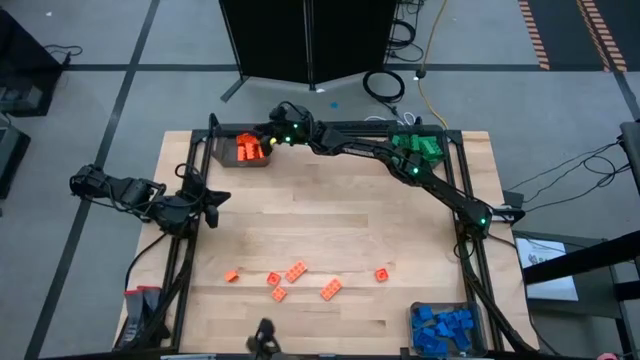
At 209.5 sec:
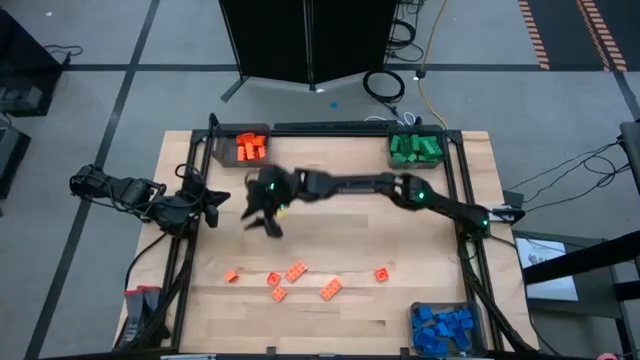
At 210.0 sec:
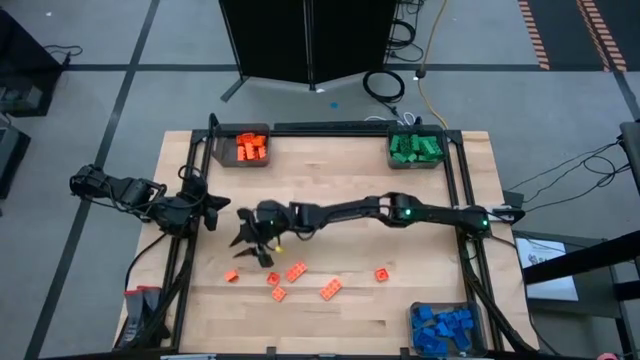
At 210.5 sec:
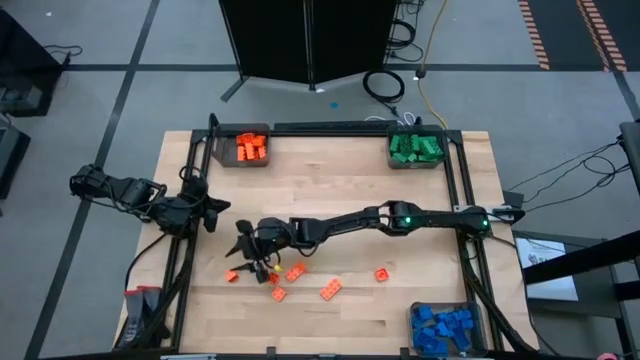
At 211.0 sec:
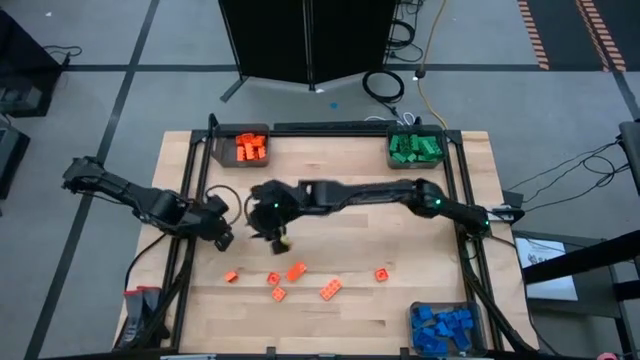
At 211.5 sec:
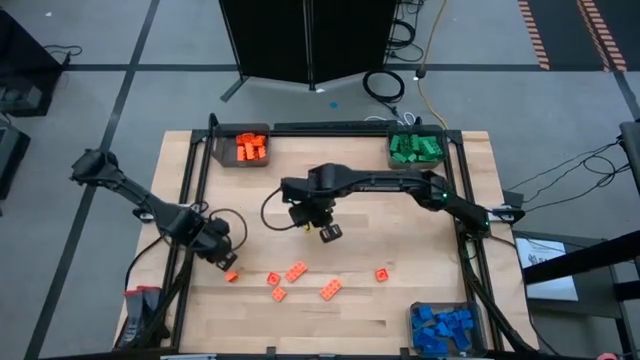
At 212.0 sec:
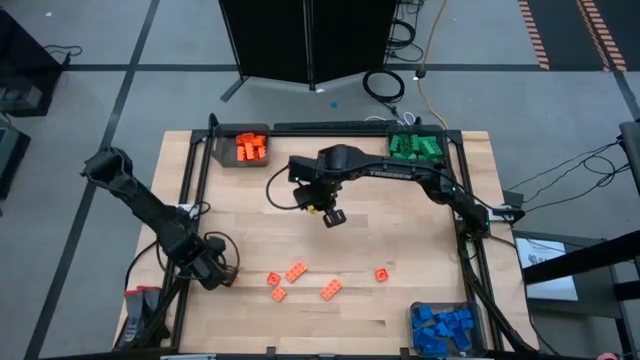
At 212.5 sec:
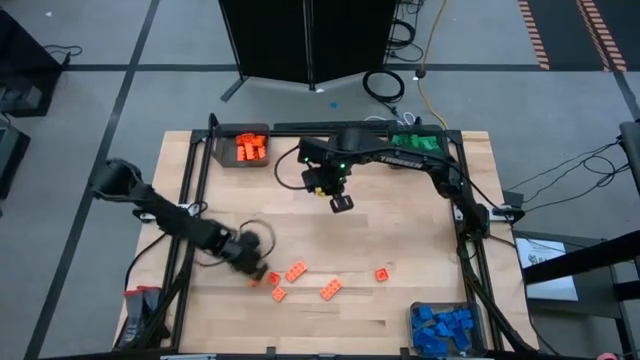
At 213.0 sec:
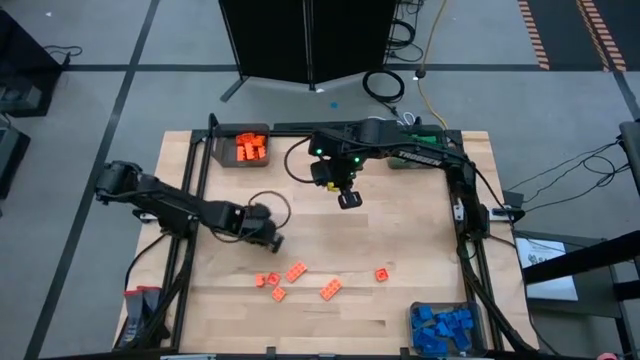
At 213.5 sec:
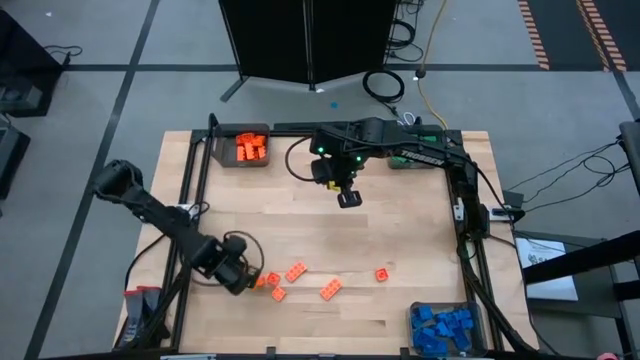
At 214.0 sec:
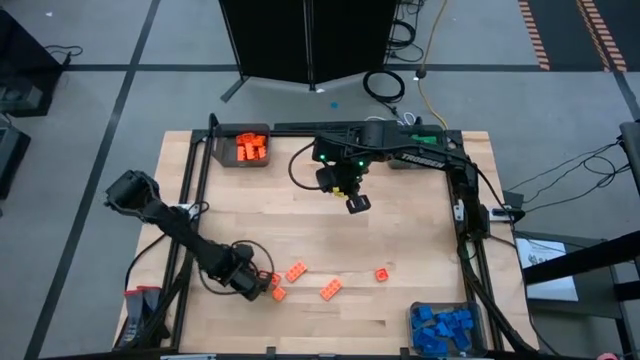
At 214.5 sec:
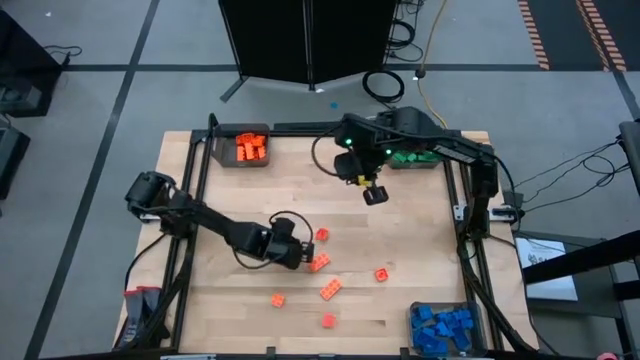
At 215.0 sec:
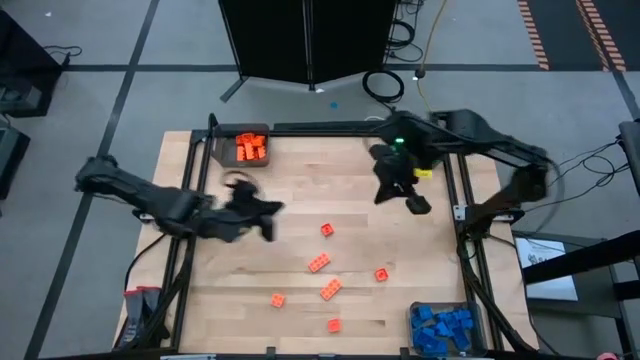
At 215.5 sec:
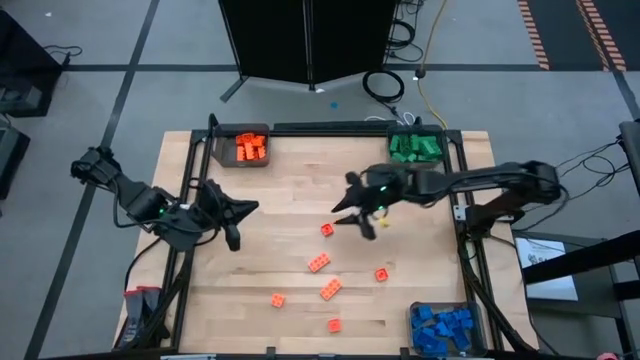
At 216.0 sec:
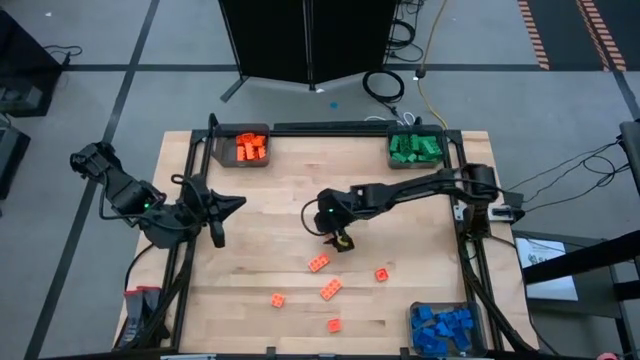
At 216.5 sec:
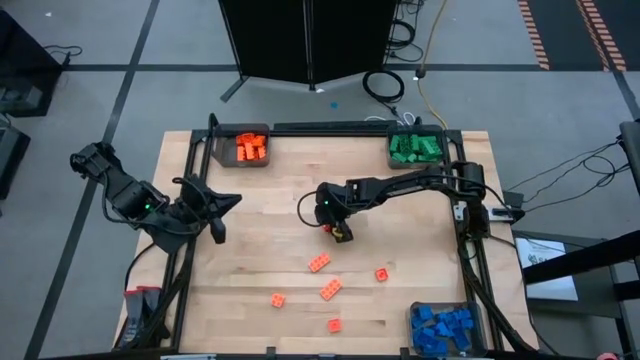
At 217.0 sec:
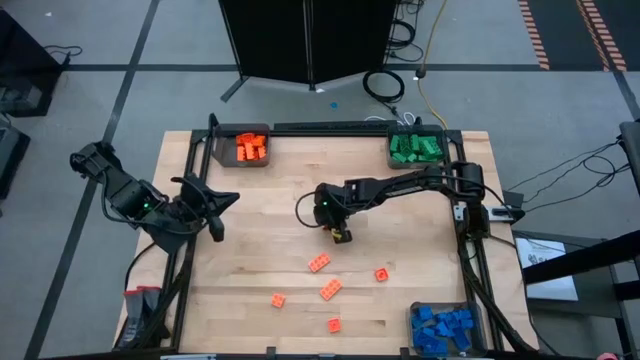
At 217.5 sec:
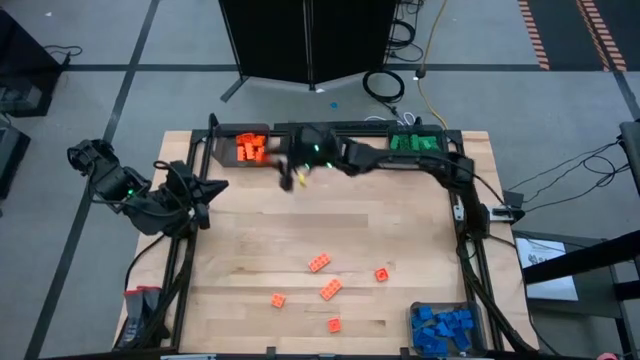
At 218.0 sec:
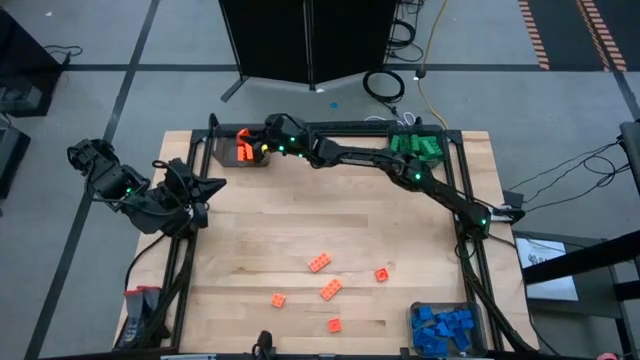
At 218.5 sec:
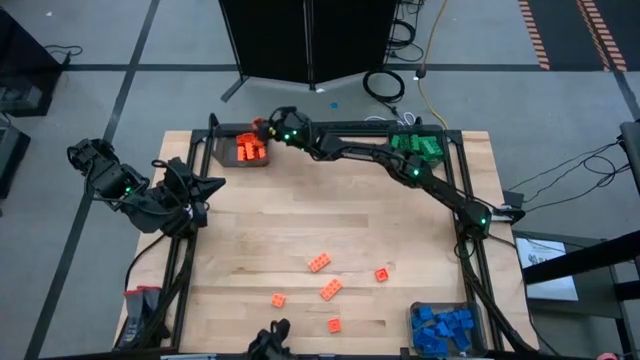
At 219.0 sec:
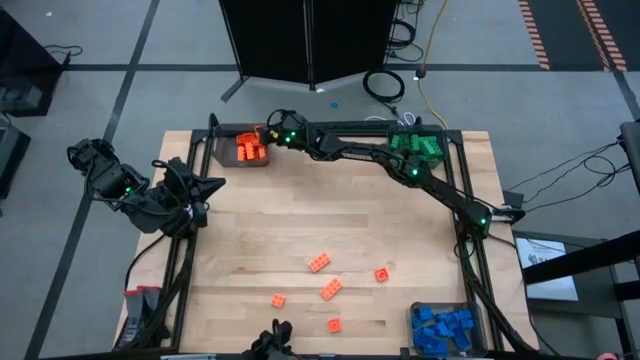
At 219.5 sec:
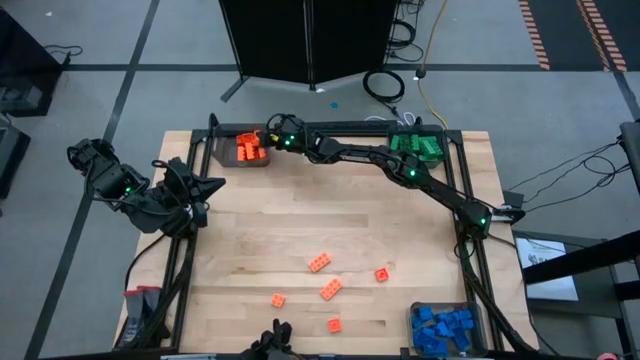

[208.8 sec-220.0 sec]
Task: Sort blocks
Put the orange game piece into the top left black bin

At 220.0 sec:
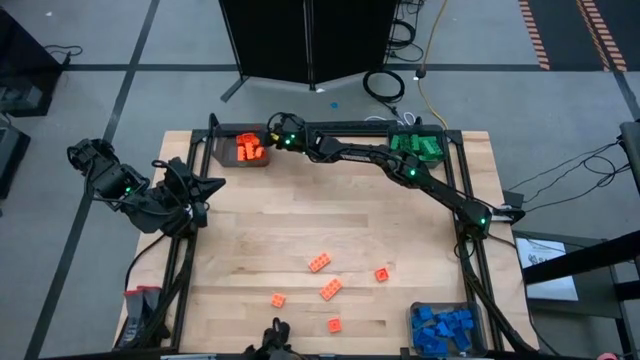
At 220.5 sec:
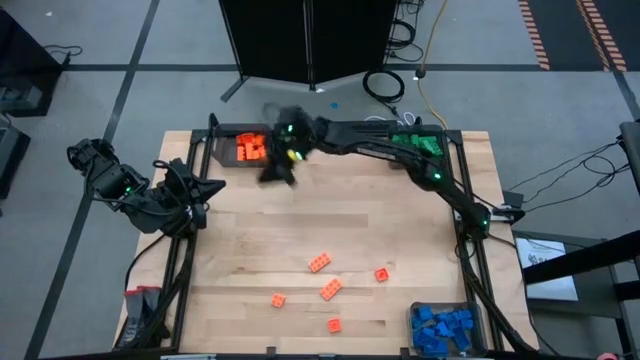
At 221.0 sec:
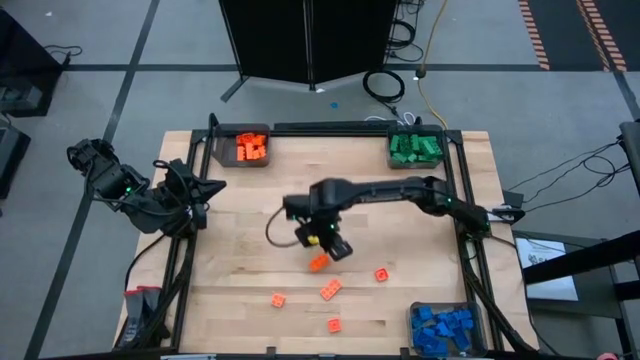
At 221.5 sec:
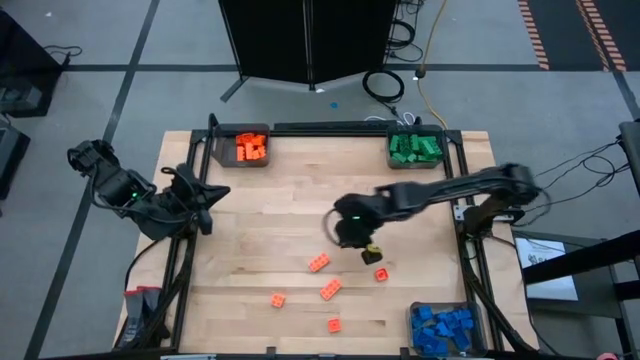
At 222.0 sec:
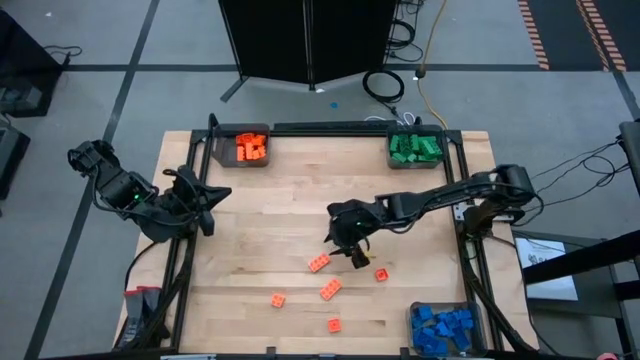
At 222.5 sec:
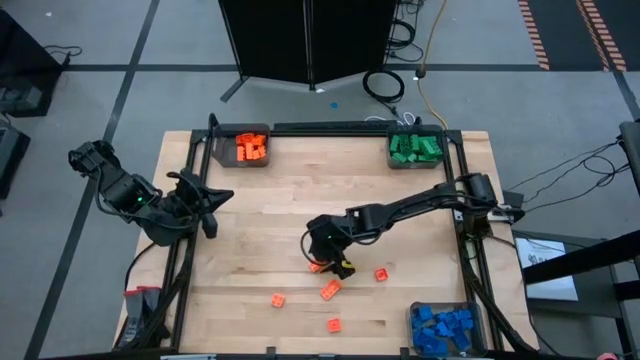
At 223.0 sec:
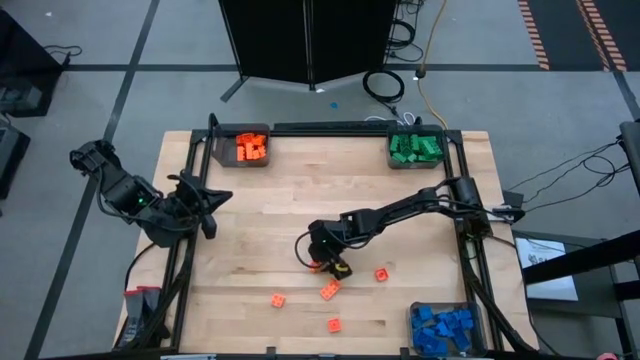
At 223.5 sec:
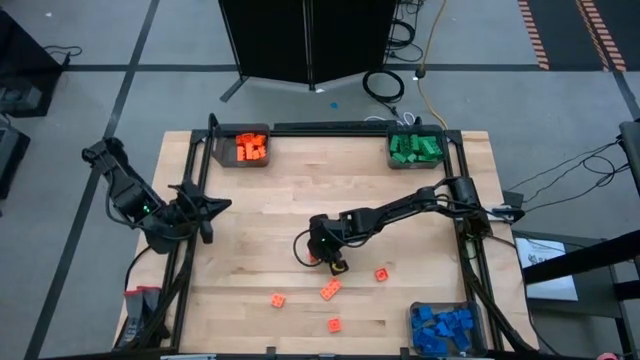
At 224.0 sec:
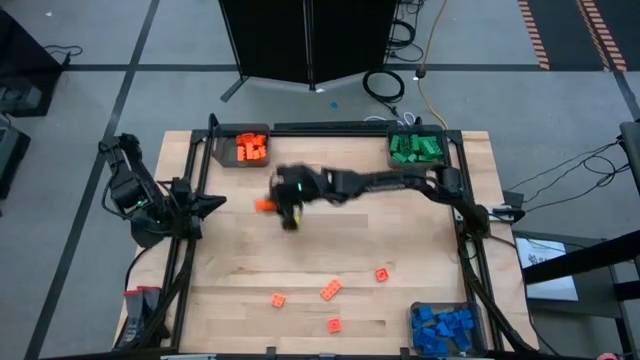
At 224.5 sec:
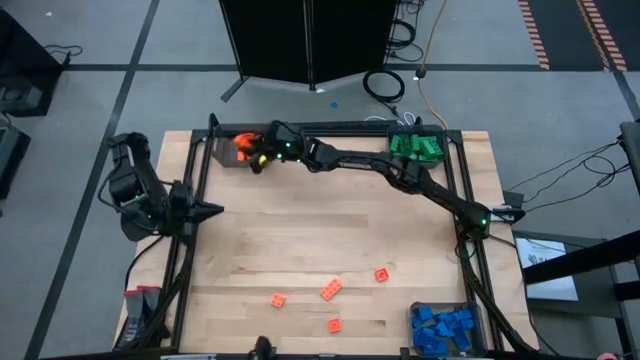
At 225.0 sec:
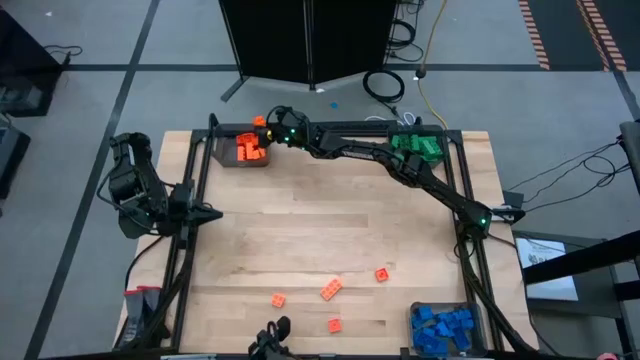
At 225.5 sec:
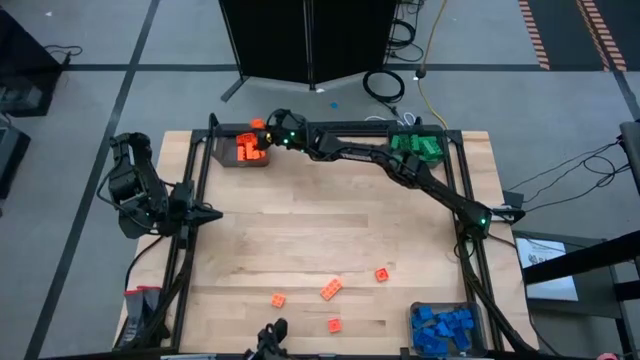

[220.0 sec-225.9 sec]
Put the orange game piece into the top left black bin

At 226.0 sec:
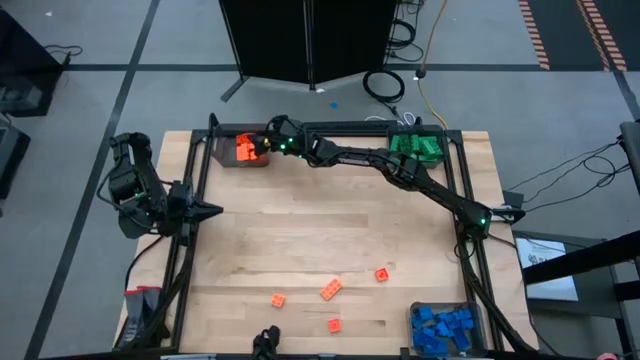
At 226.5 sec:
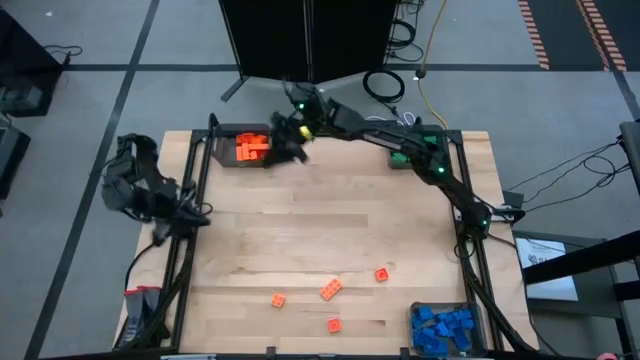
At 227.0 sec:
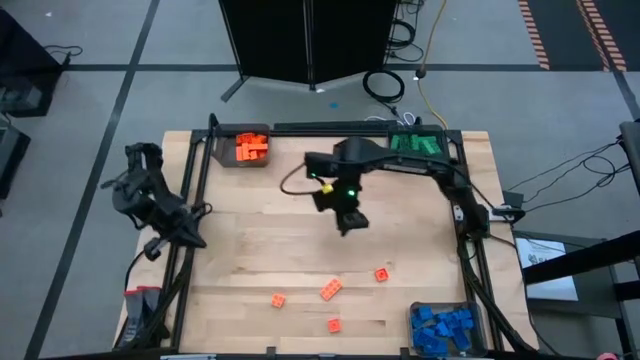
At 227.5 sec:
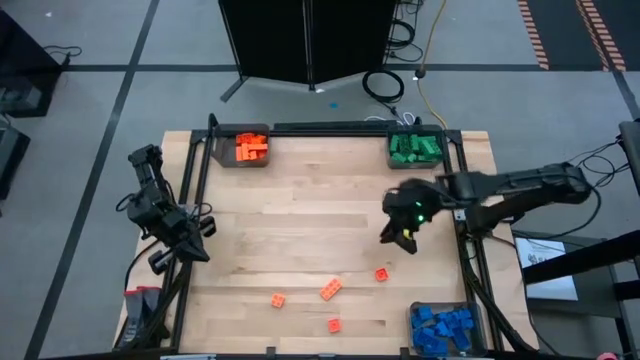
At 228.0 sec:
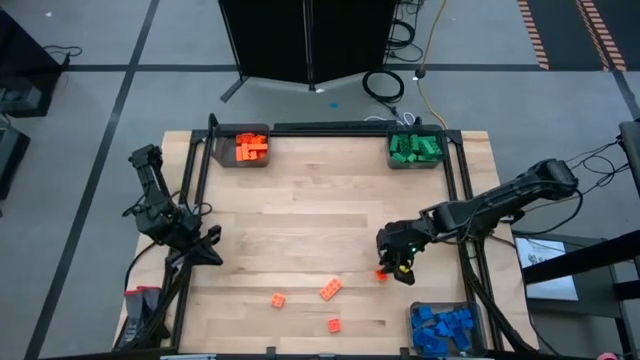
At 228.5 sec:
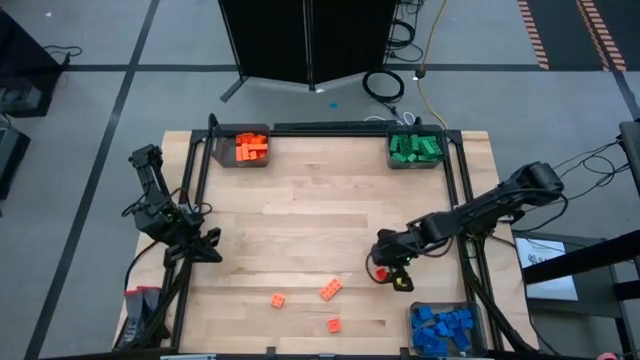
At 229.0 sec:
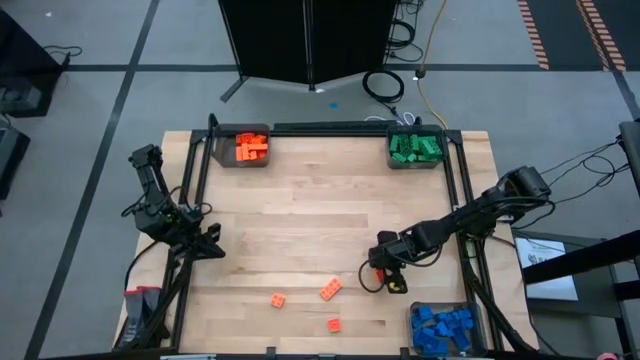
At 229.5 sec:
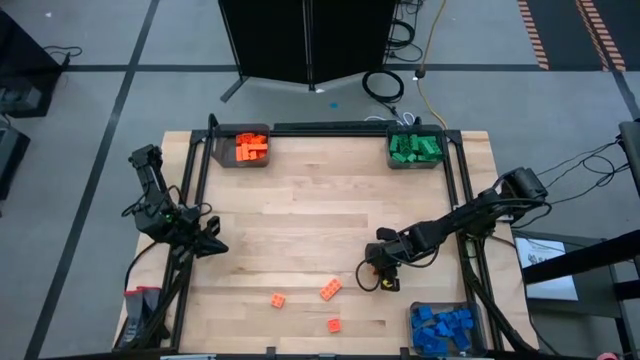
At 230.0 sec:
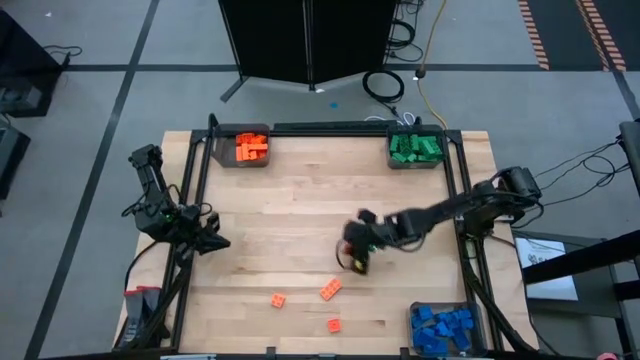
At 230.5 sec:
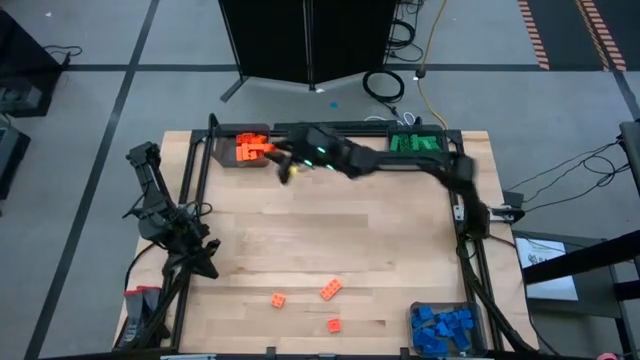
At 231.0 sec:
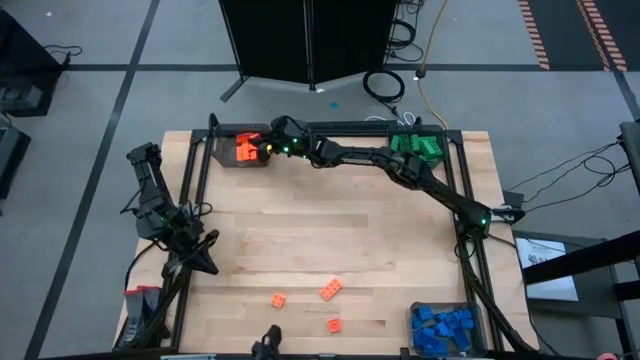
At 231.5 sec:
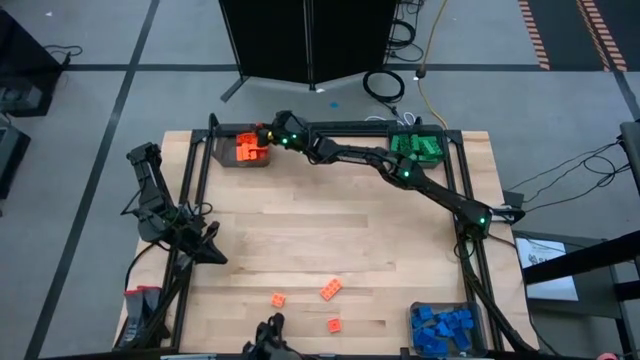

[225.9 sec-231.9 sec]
Put the orange game piece into the top left black bin
